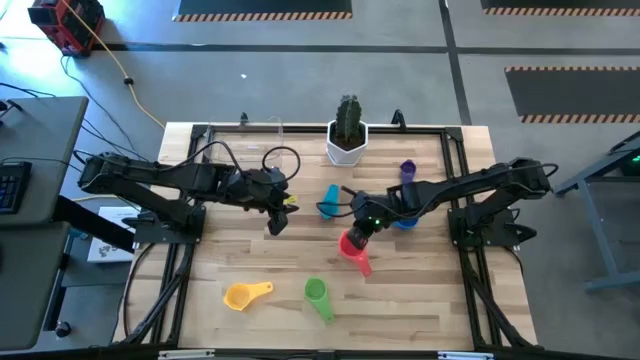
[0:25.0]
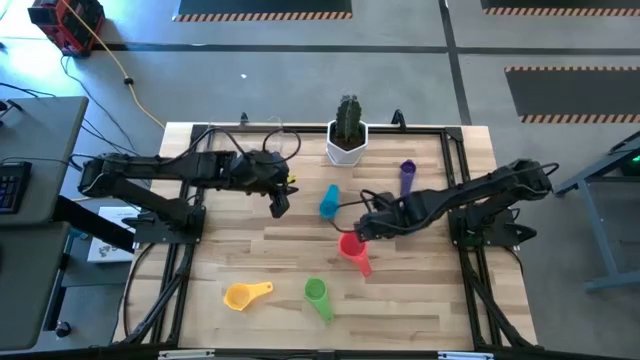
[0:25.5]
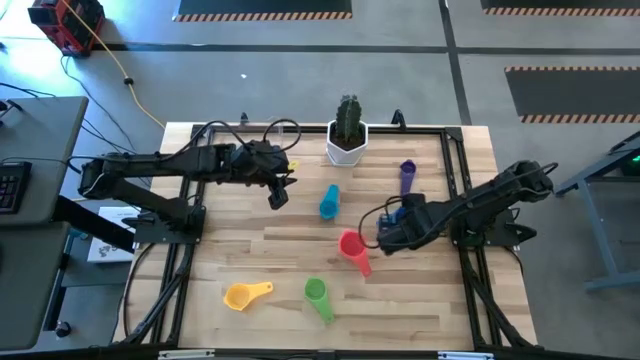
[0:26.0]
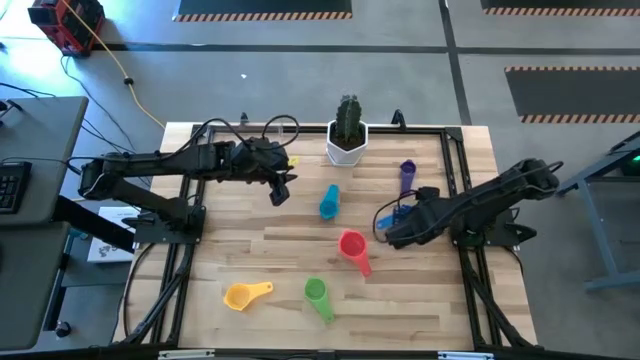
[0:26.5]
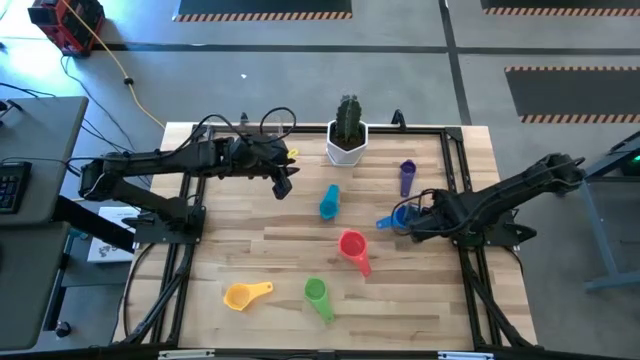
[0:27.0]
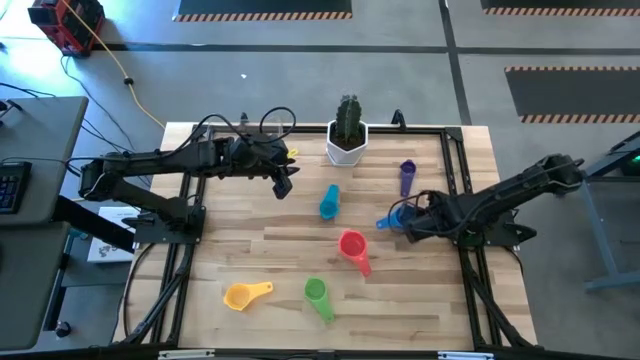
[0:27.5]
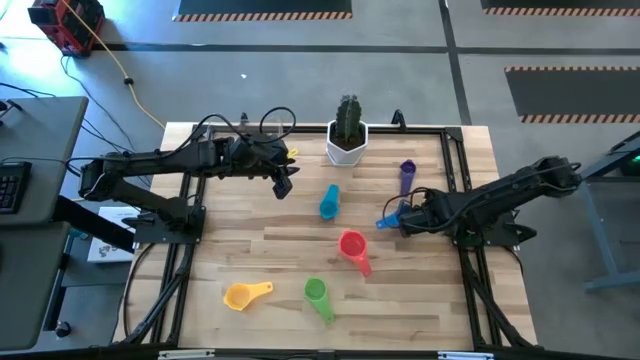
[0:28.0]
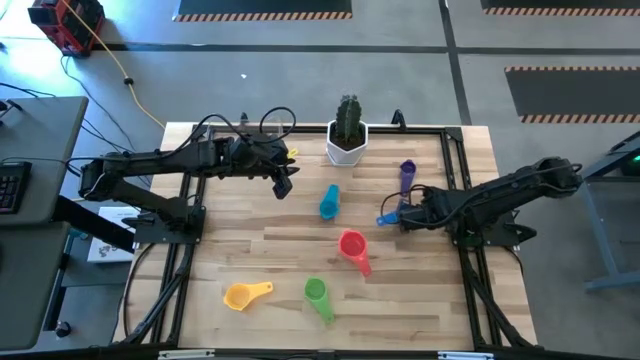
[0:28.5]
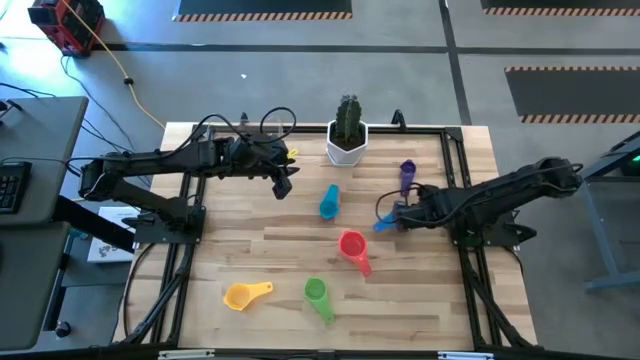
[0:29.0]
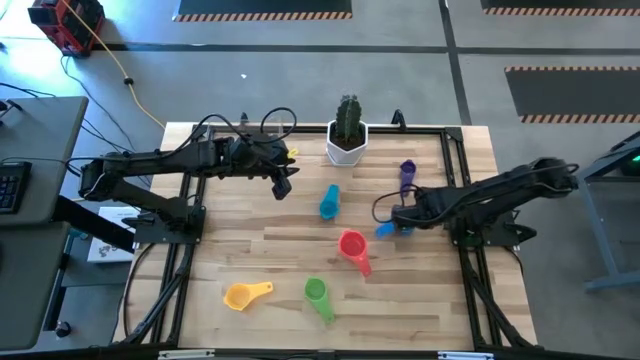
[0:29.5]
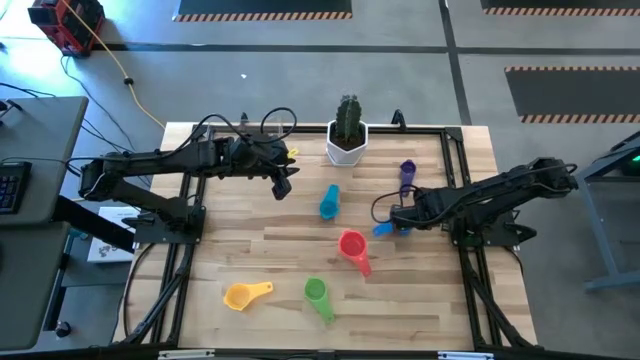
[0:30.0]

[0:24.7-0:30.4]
Task: Nest measuring cups in basket
Stack the blue measuring cup on the red measuring cup

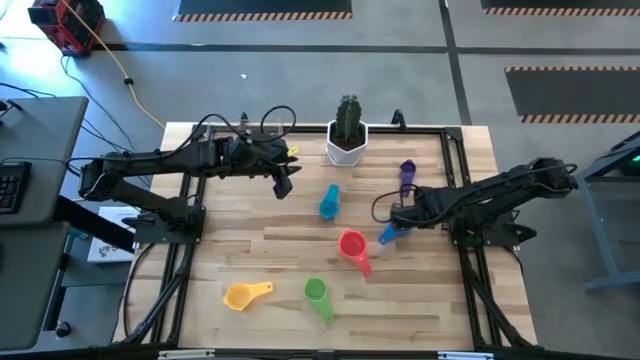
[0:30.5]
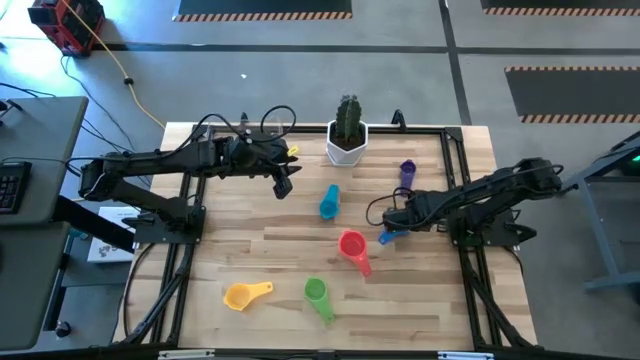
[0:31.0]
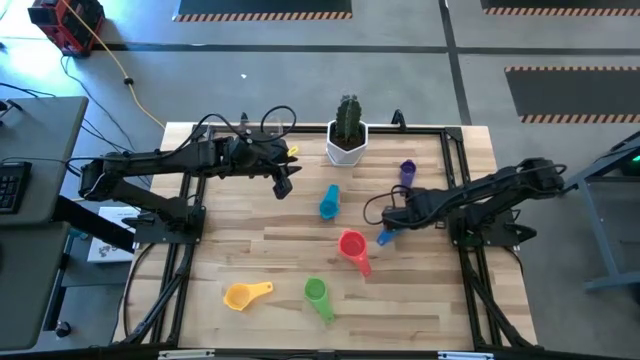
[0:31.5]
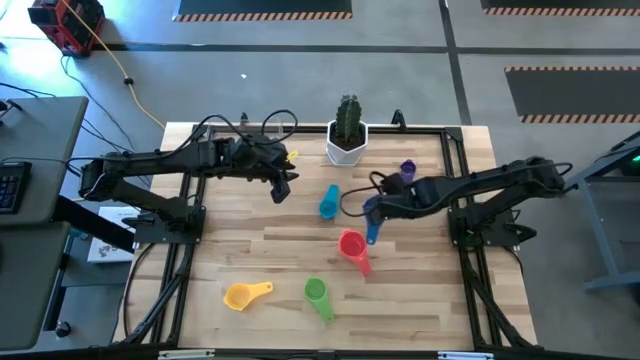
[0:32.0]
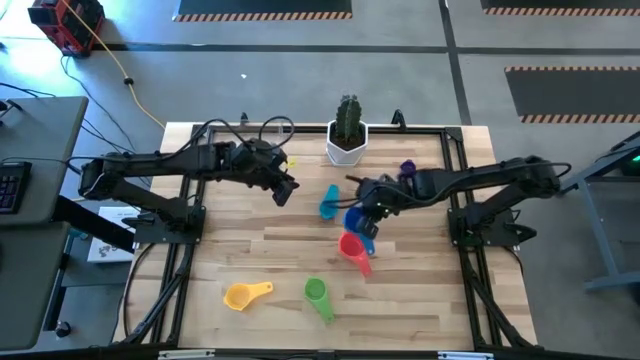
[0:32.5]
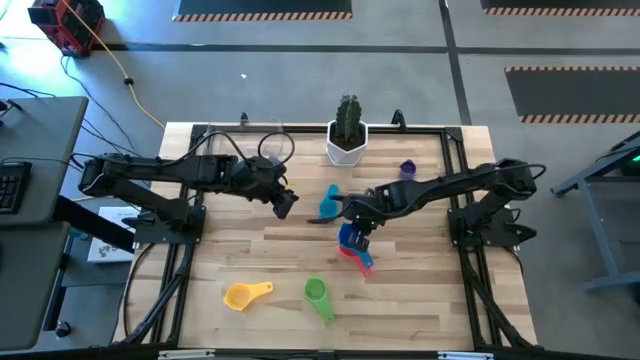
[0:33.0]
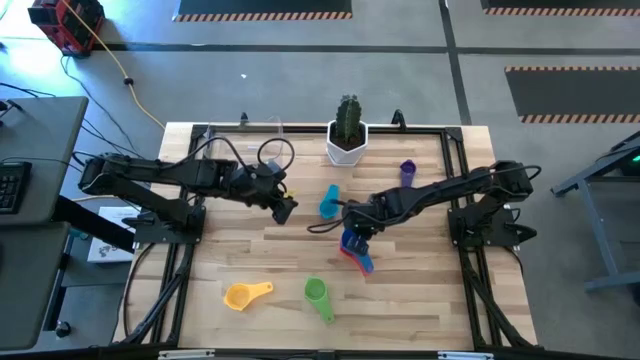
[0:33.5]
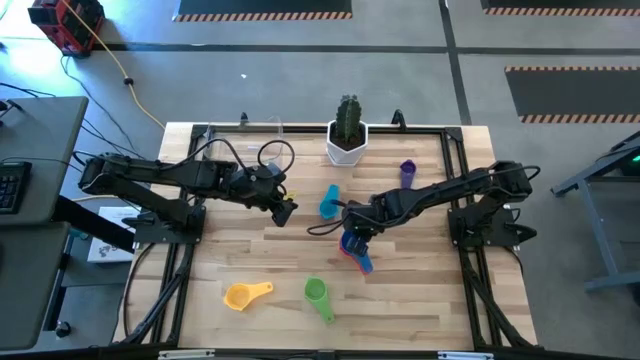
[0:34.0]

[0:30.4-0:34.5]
Stack the blue measuring cup on the red measuring cup

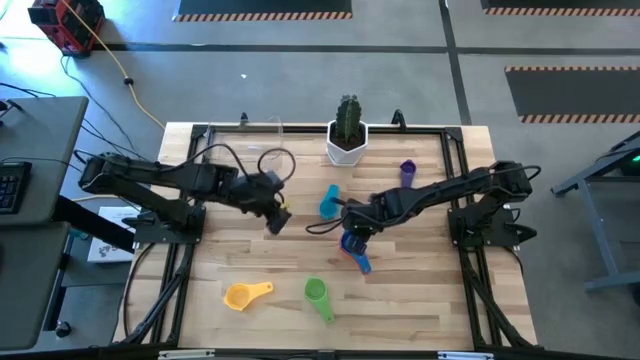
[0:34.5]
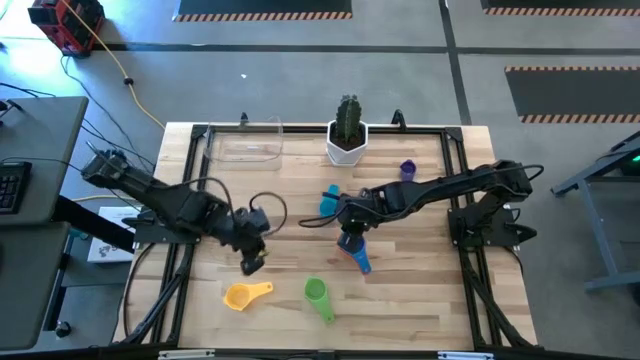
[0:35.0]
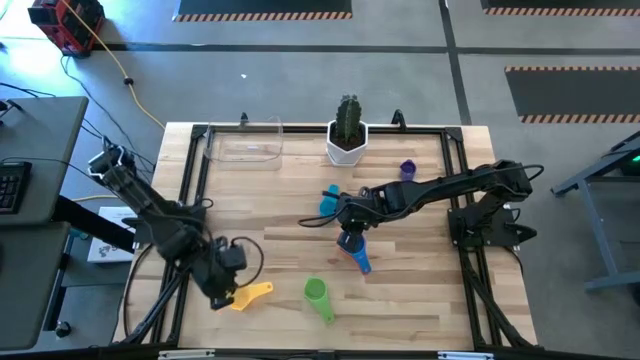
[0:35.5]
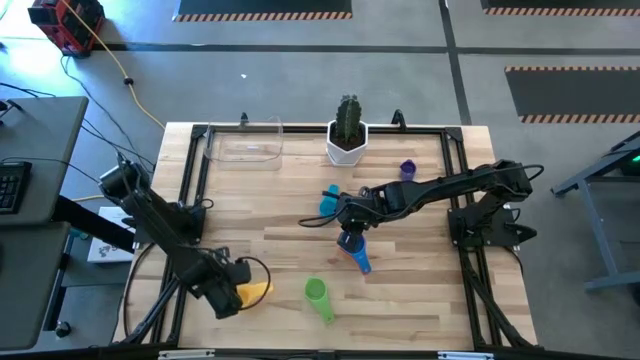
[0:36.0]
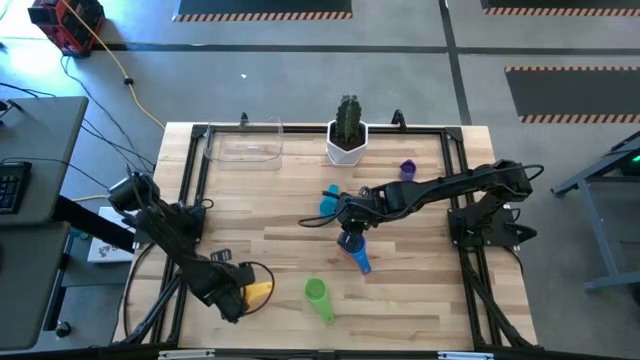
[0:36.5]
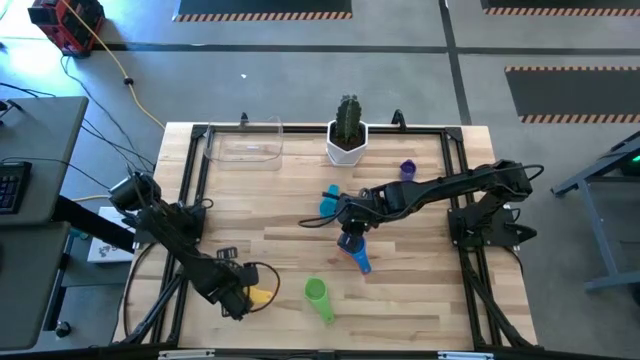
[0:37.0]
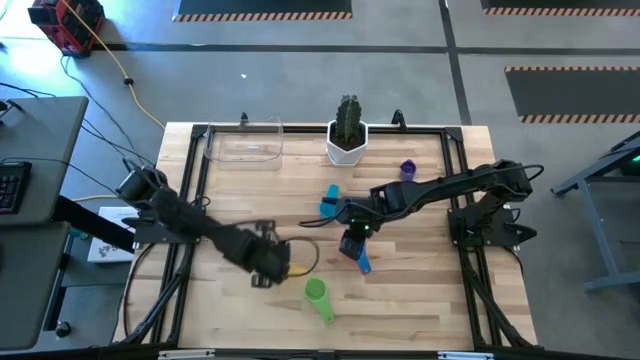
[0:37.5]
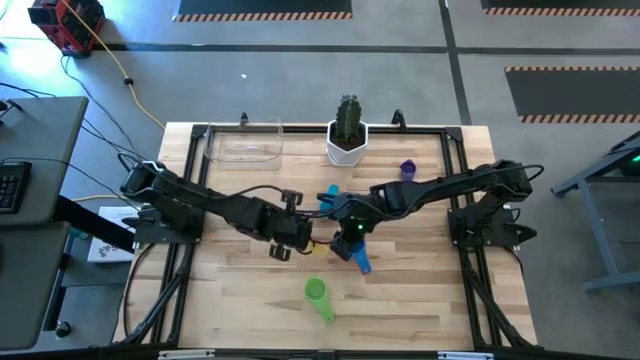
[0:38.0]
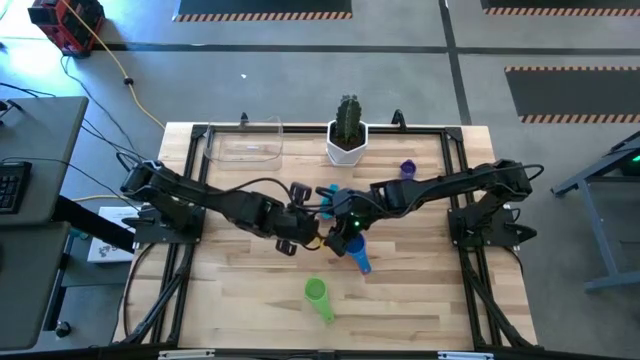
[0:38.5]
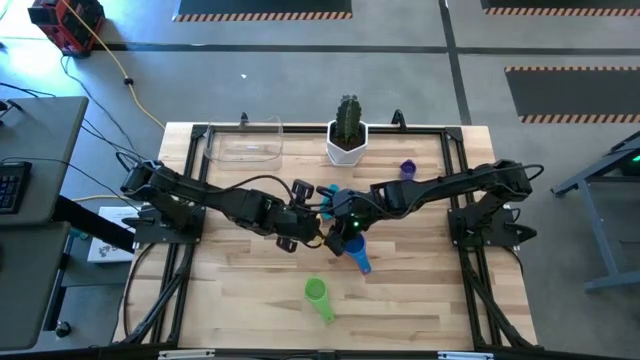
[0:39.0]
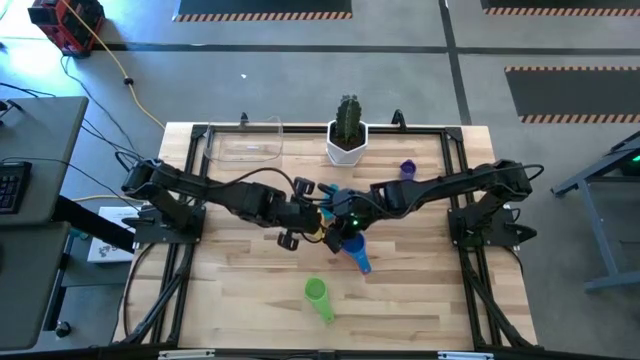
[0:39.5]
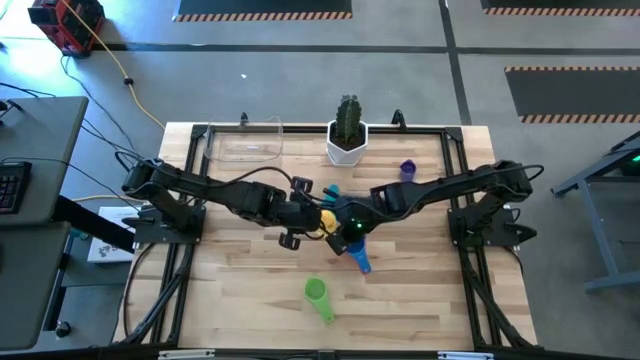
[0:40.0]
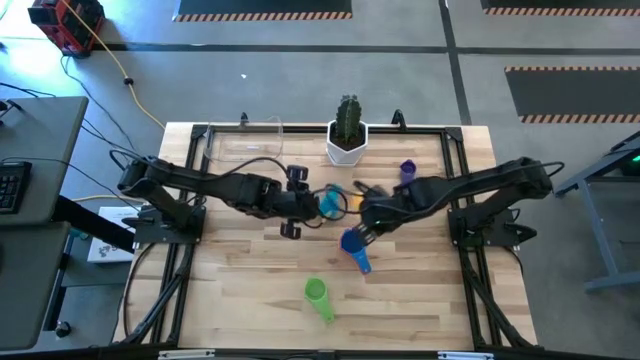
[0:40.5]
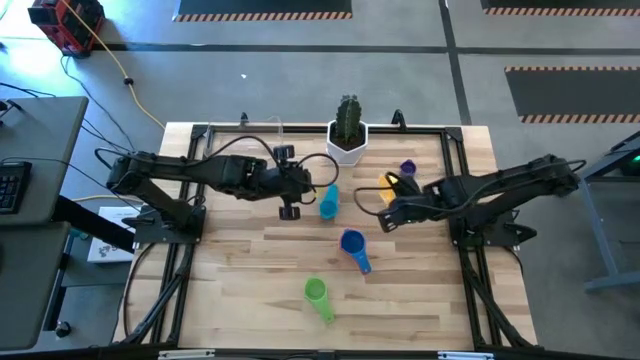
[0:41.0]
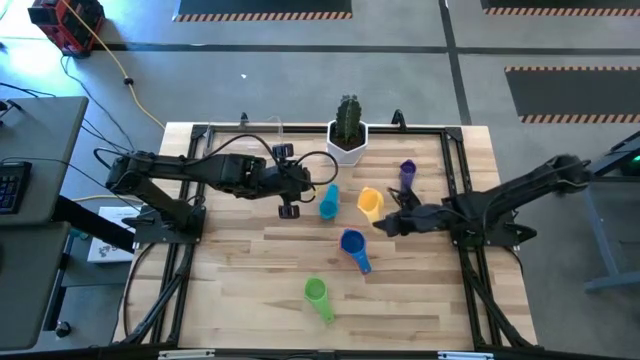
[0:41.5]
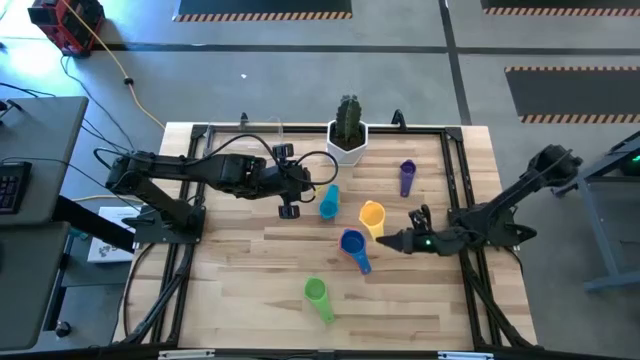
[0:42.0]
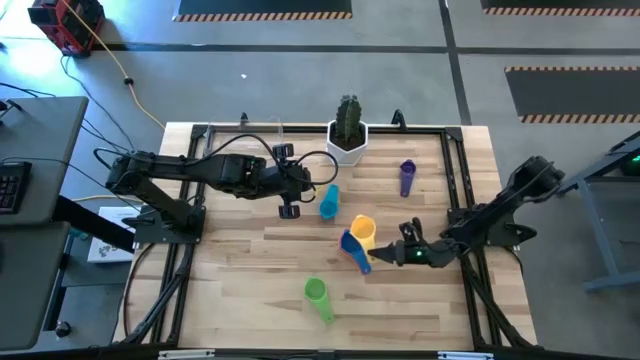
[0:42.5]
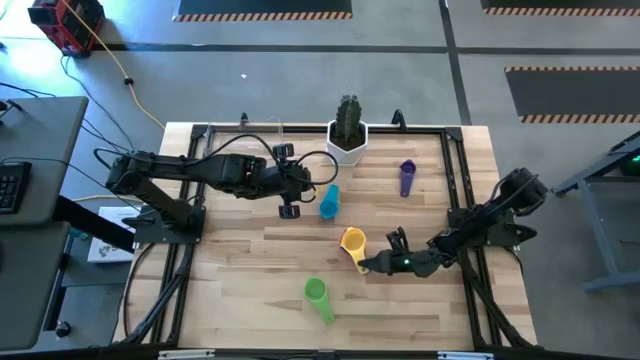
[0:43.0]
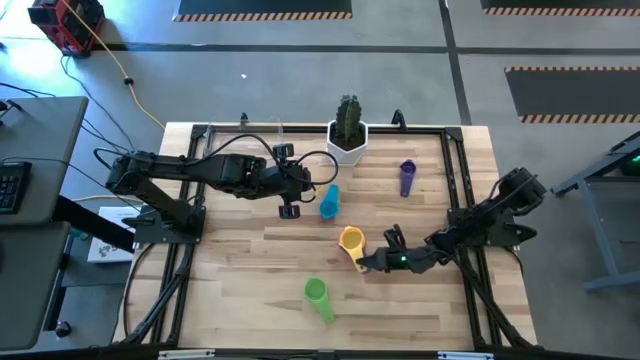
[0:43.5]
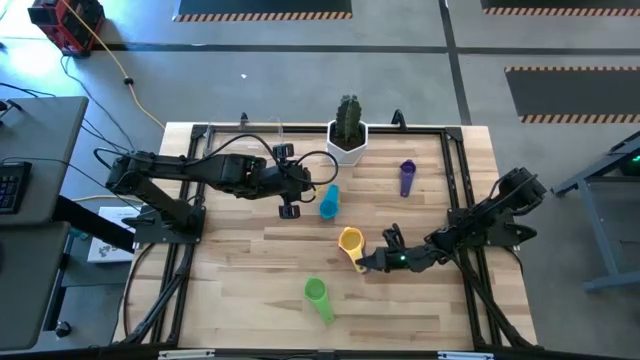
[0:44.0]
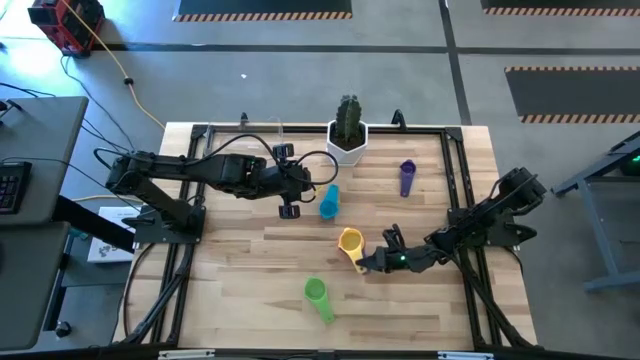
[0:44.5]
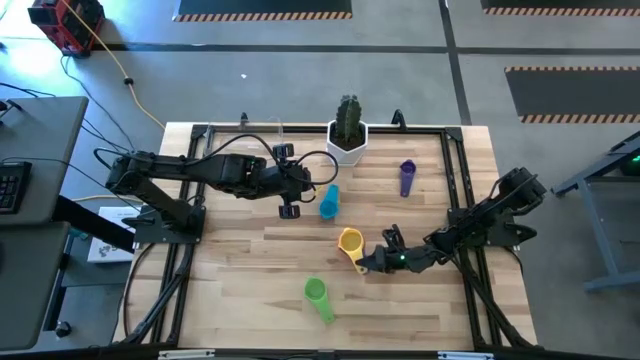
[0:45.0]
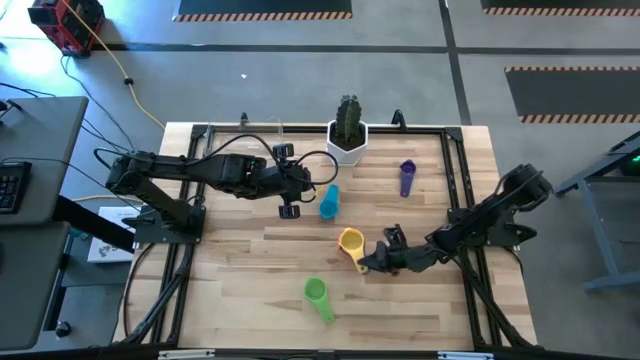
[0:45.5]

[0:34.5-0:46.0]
Stack the yellow measuring cup on the blue measuring cup

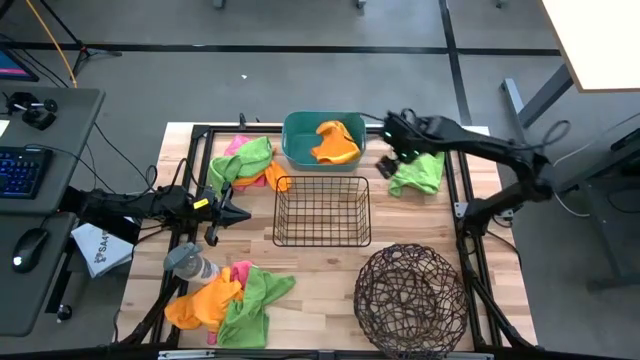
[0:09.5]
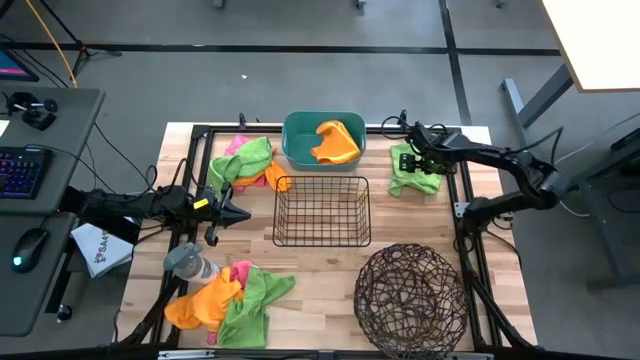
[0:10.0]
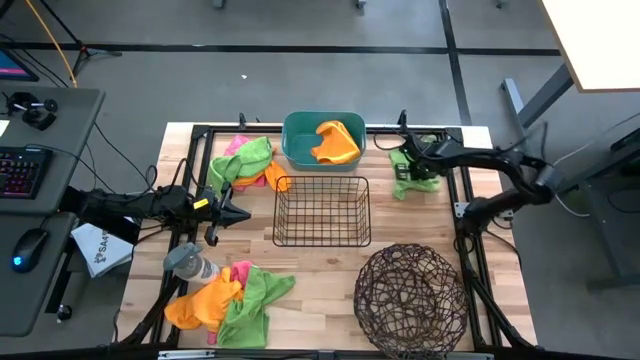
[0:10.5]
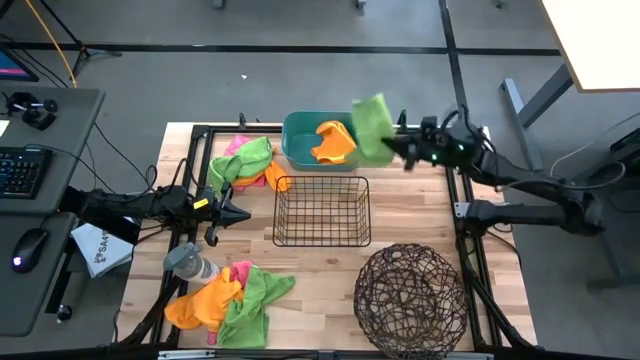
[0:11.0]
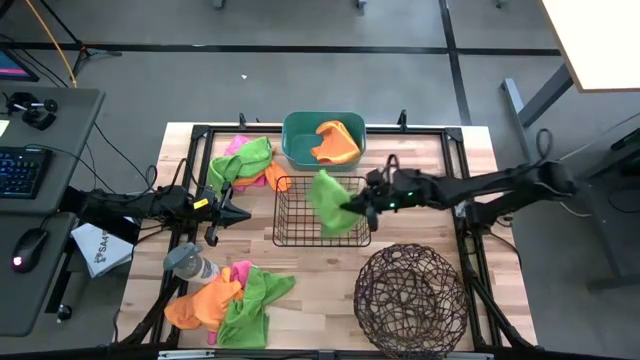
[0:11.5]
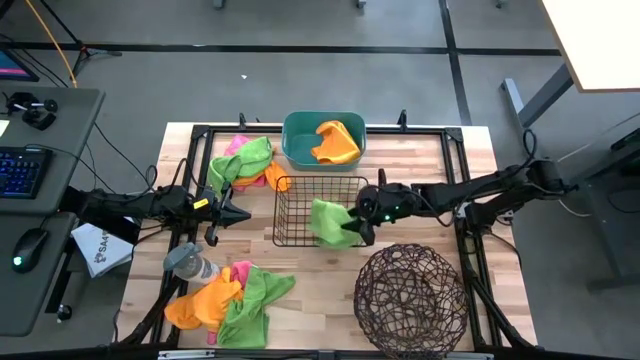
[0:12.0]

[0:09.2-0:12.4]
Task: Sort microfiber towel by color & place in baskets
Put the top right green microfiber cloth into the black wire basket
